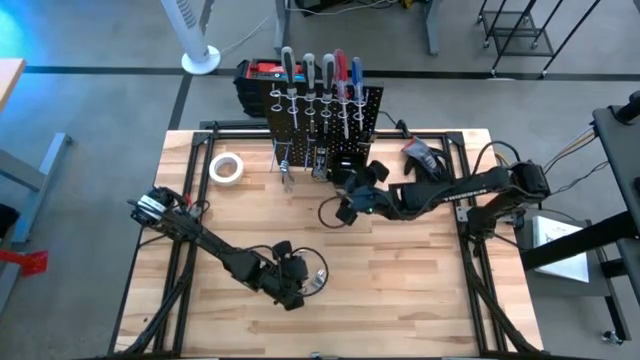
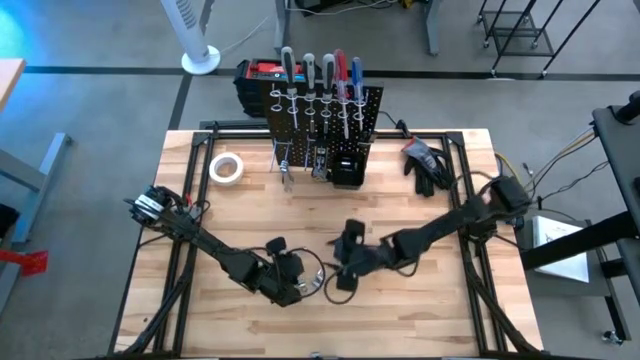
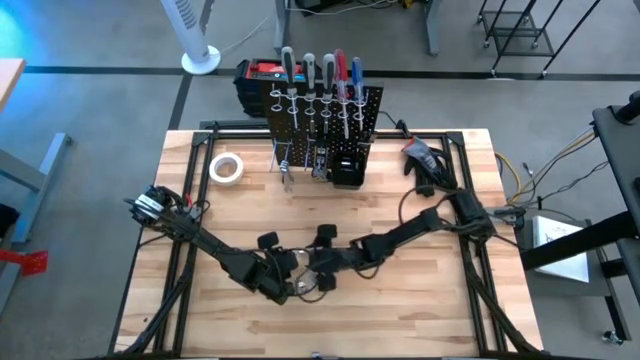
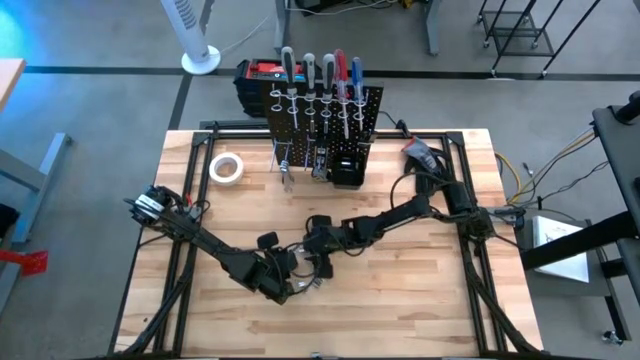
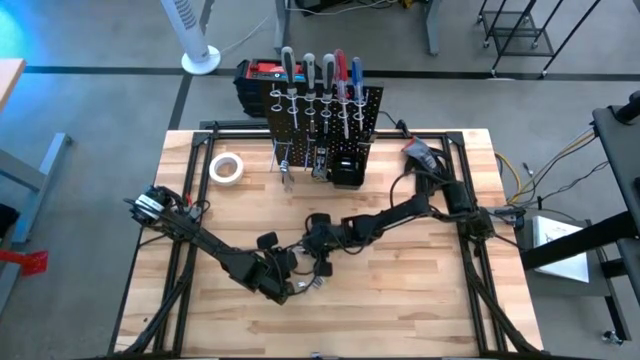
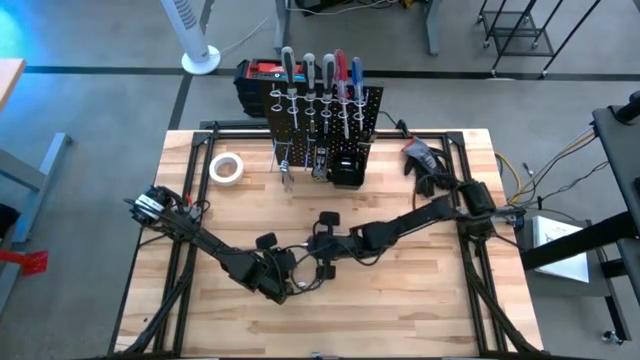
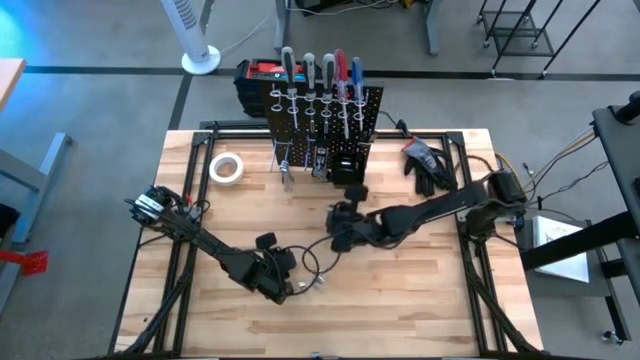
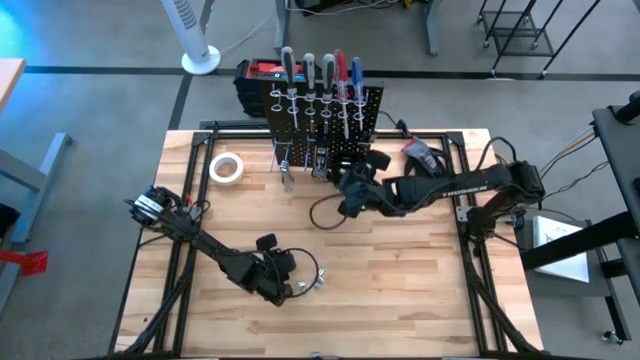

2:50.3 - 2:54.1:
Task: Hang tools onto peg board
Put the socket wrench into the bin on the peg board

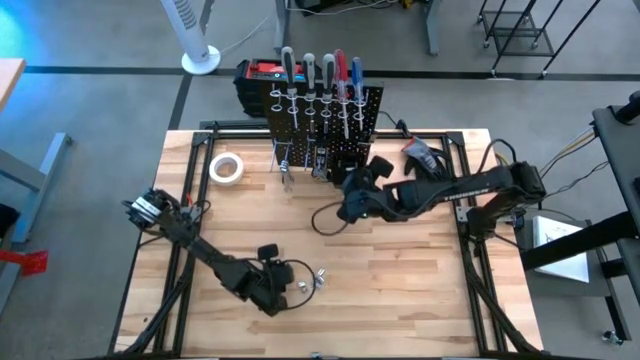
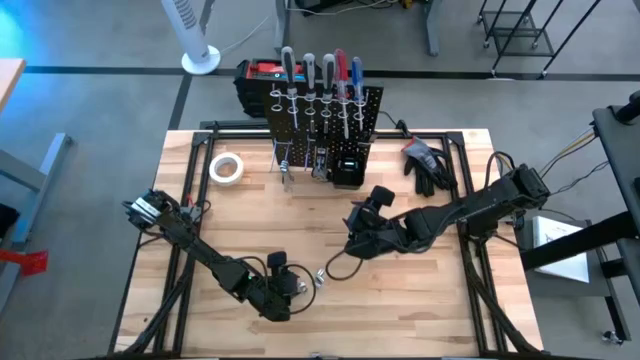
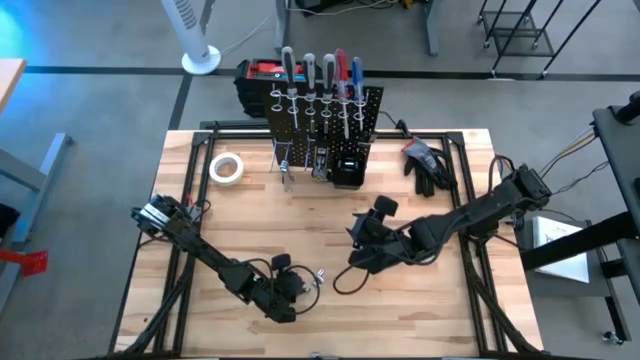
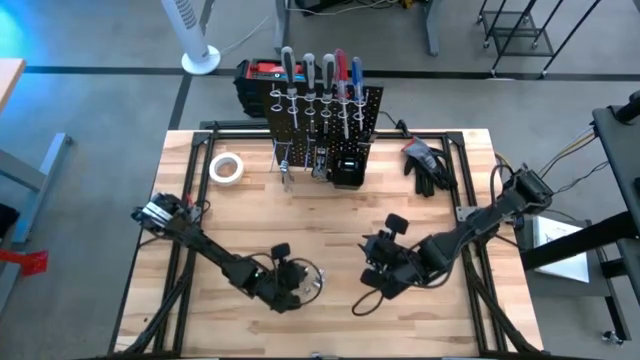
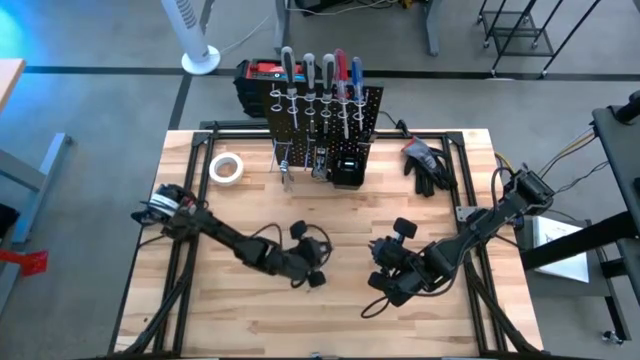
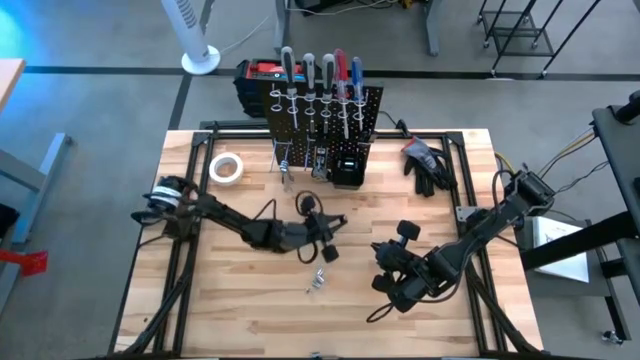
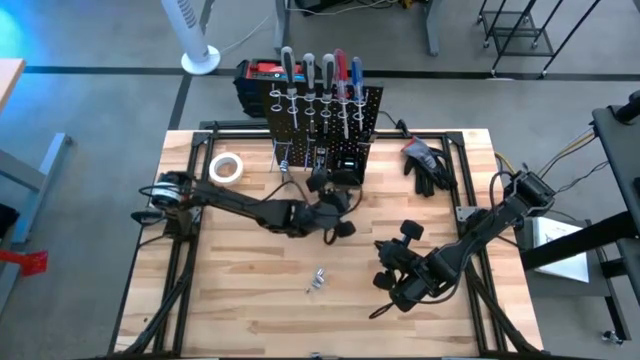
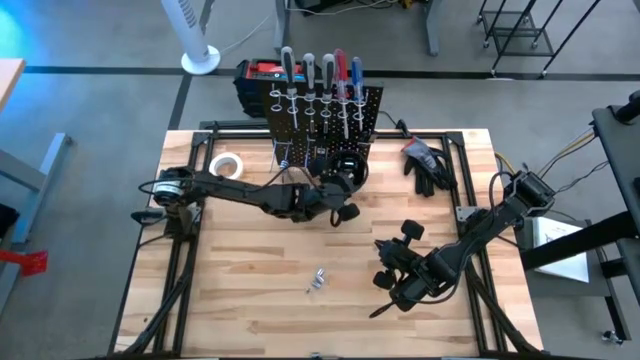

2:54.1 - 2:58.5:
Put the socket wrench into the bin on the peg board

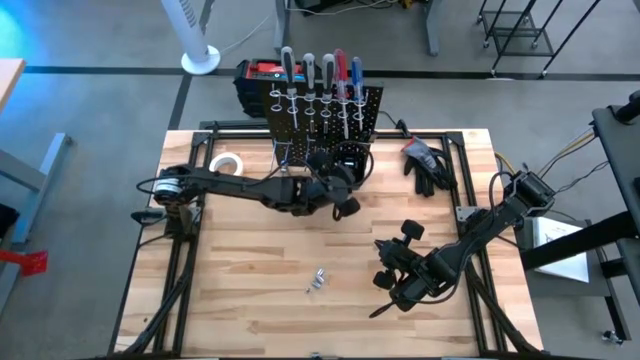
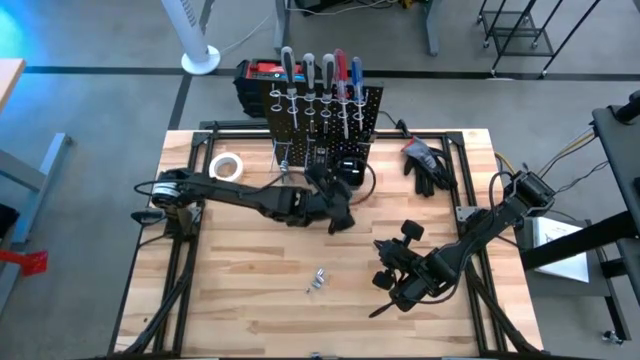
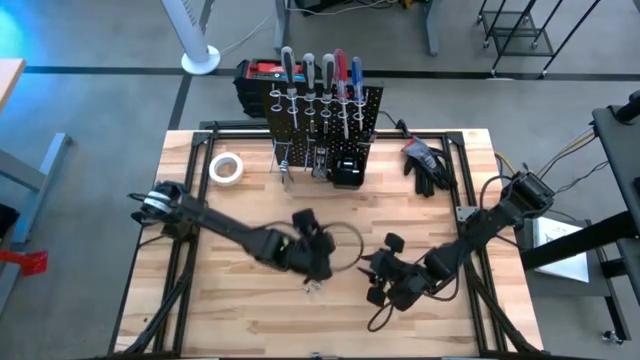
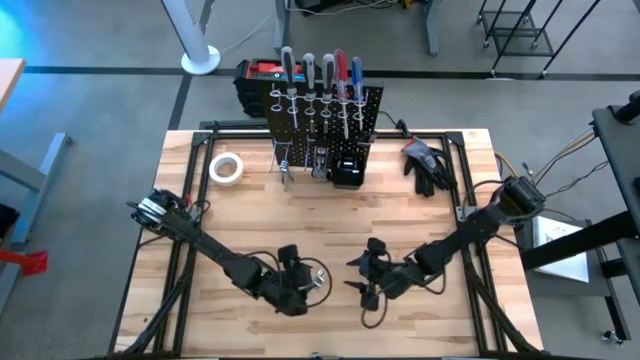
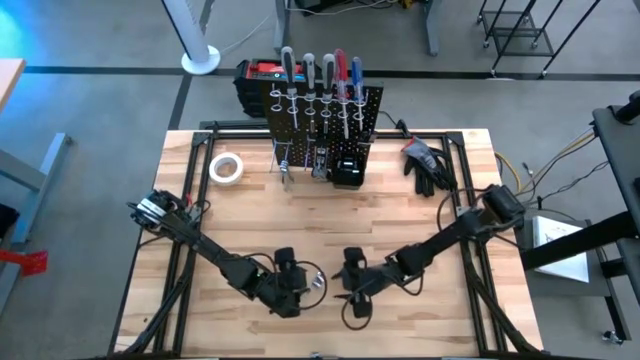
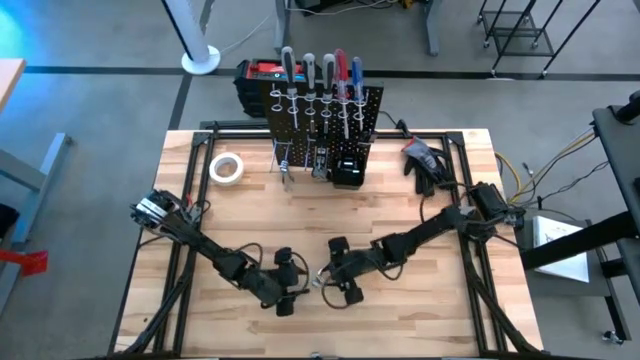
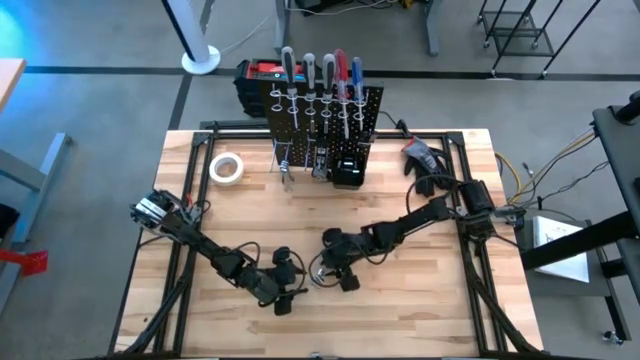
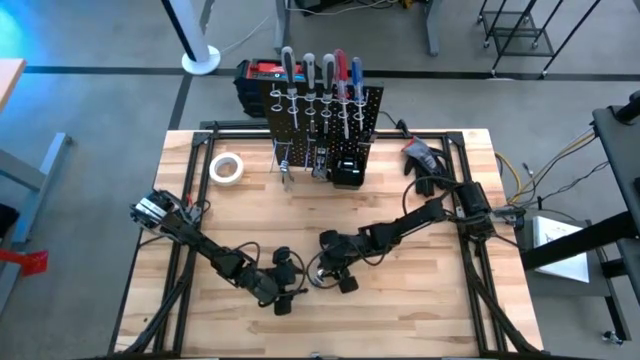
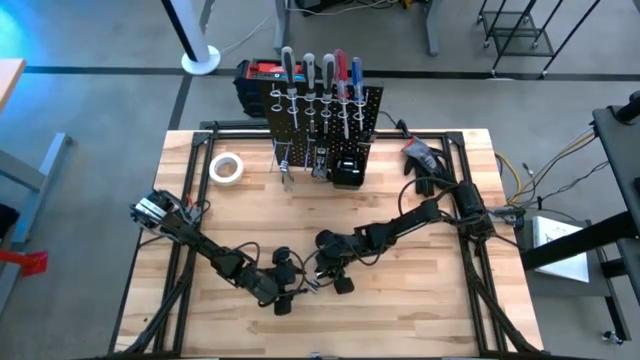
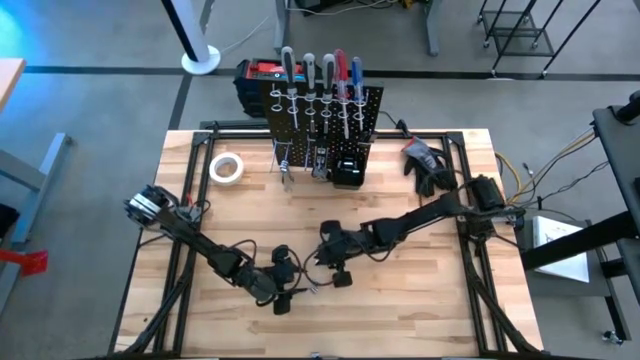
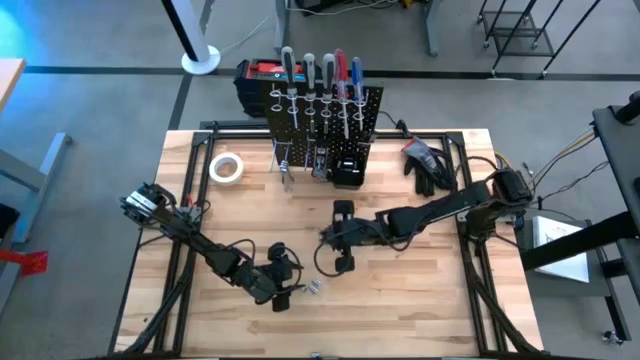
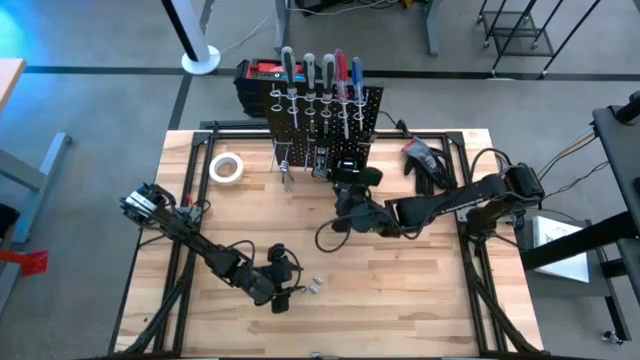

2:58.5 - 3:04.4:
Put the socket wrench into the bin on the peg board

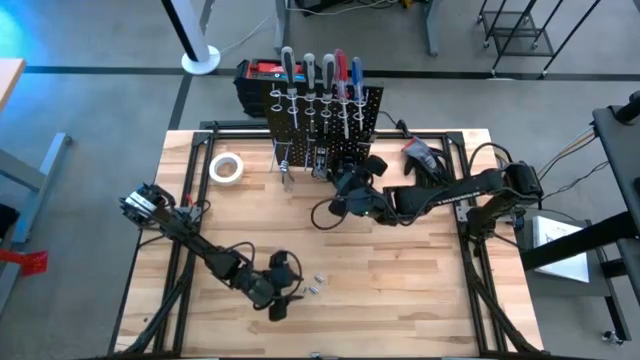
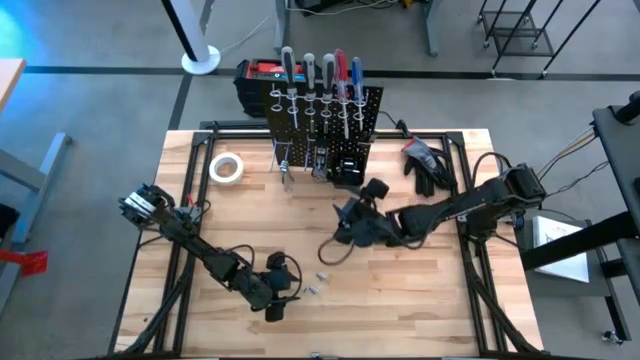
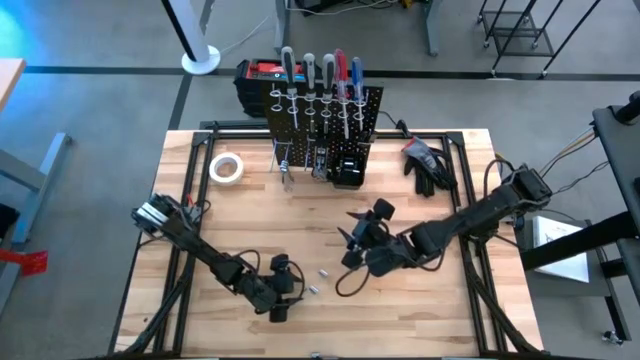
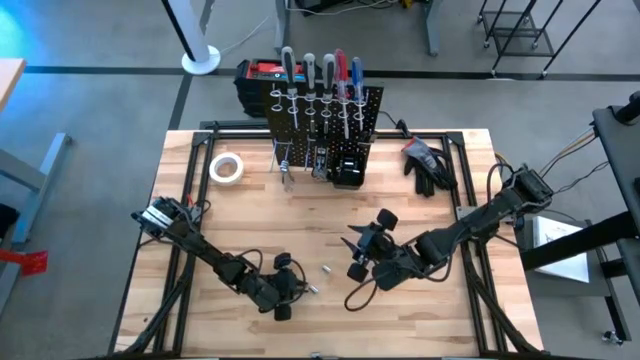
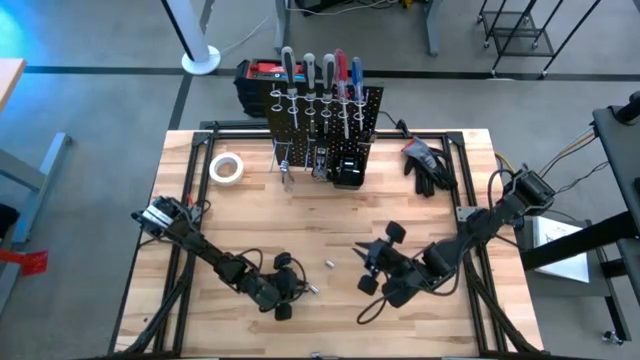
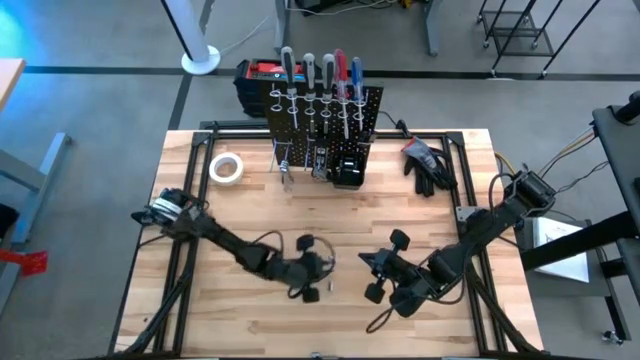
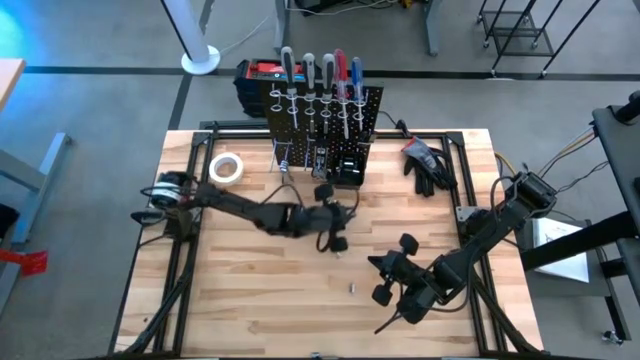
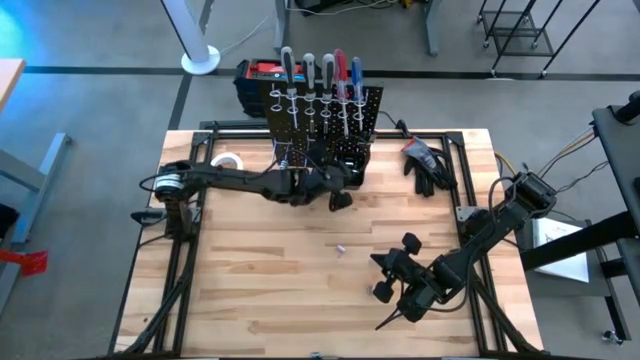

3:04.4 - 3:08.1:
Put the socket wrench into the bin on the peg board

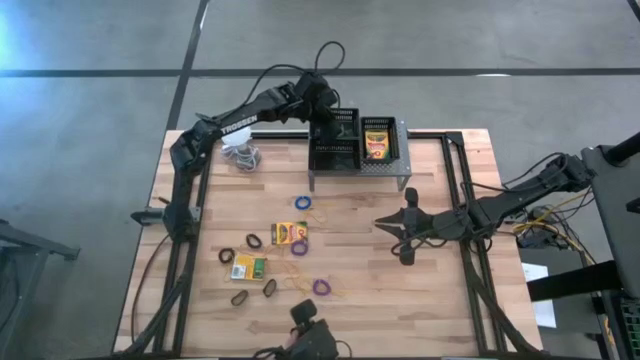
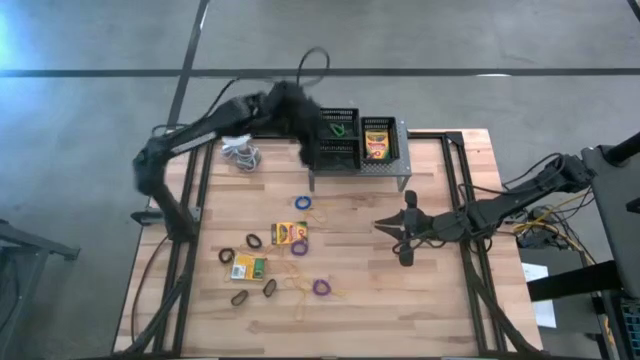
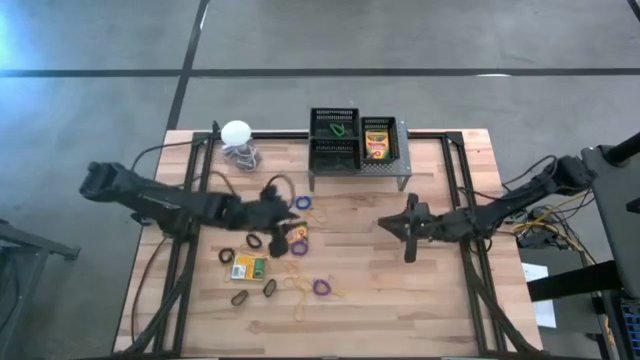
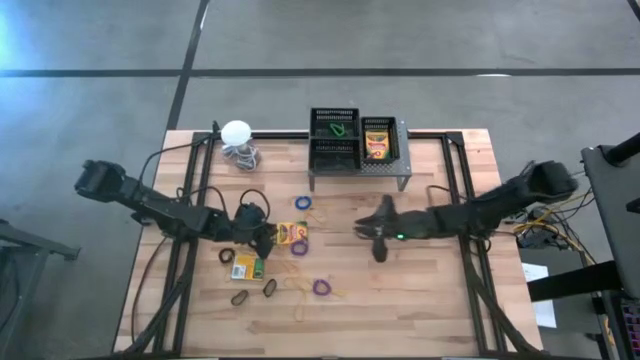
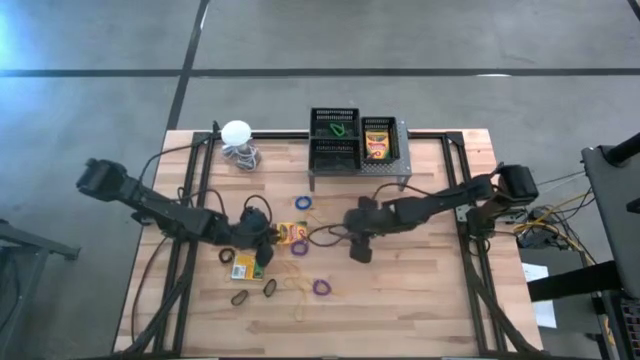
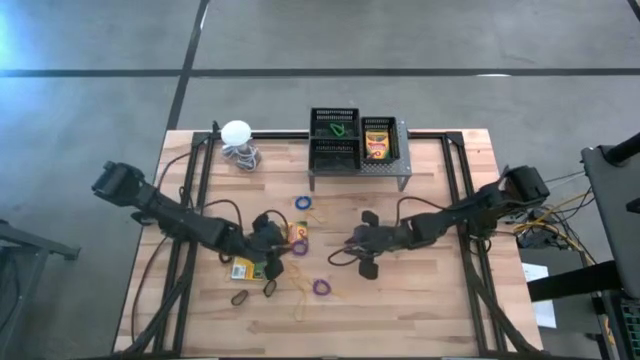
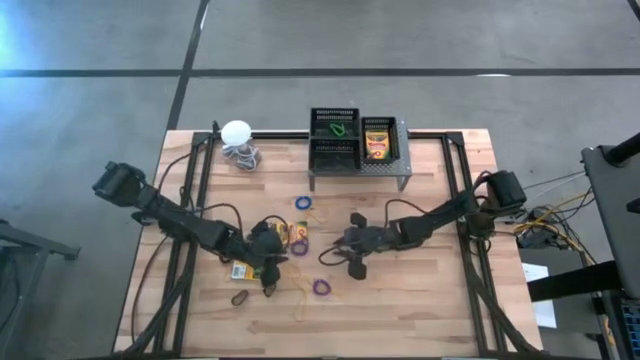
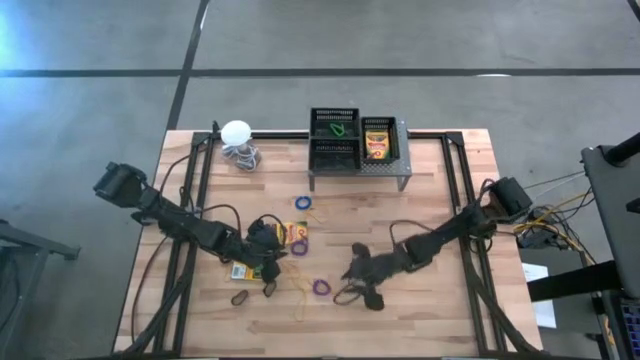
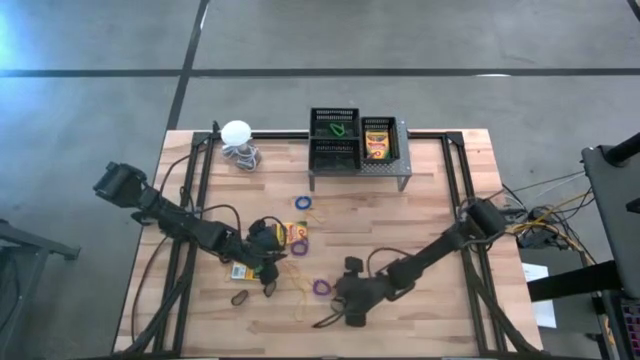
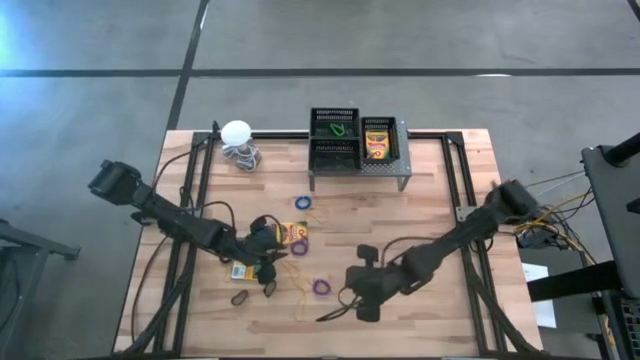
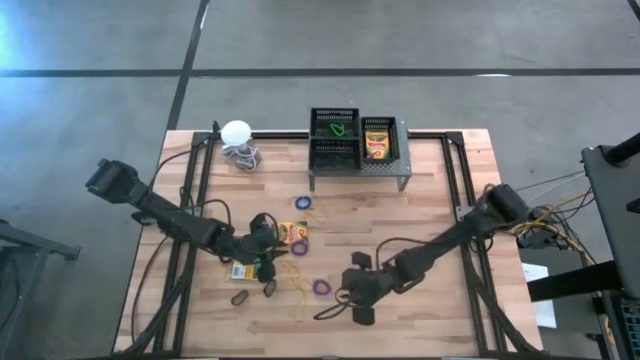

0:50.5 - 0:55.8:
Task: Pick & Place Office Desk Supplies
Put the yellow rubber band into the bottom left black bin
